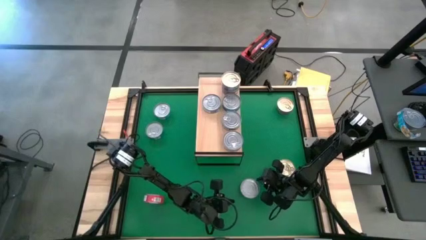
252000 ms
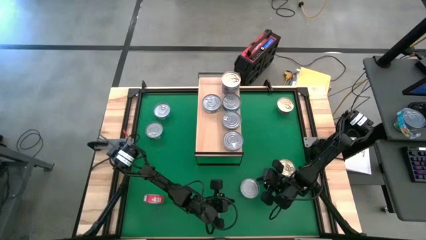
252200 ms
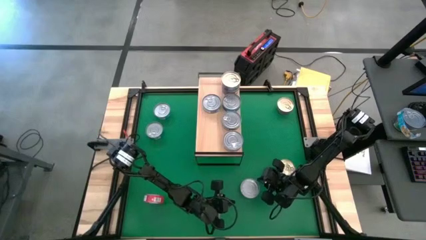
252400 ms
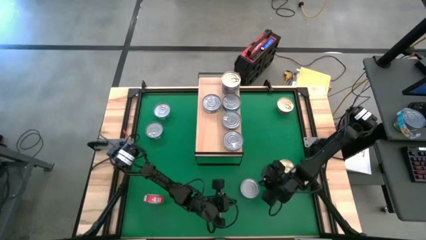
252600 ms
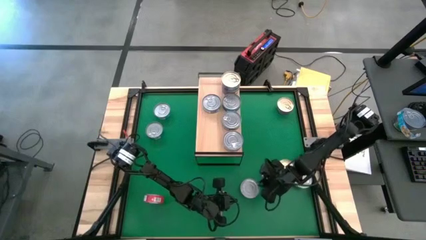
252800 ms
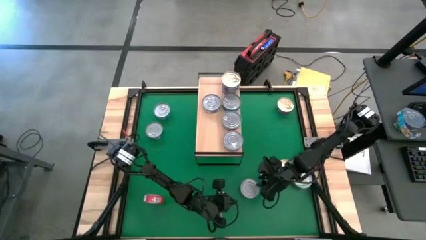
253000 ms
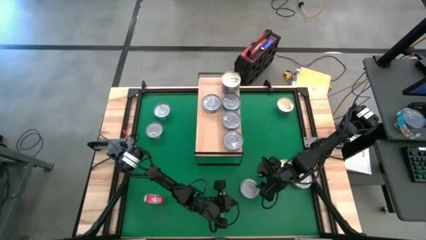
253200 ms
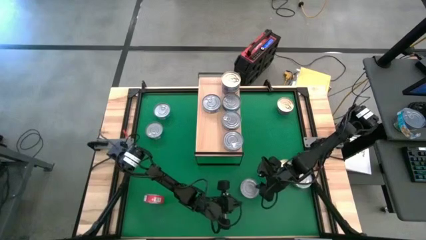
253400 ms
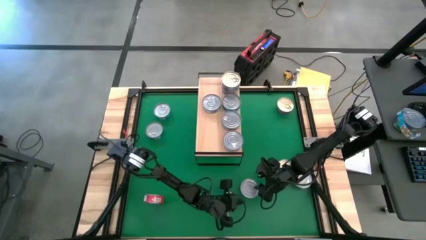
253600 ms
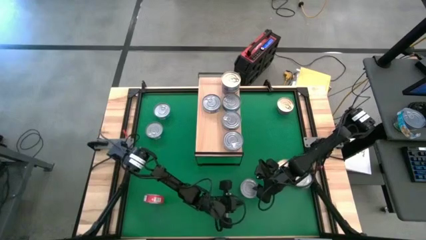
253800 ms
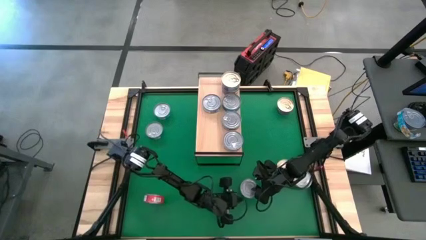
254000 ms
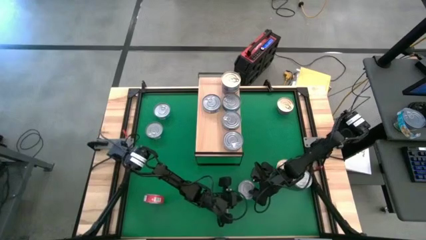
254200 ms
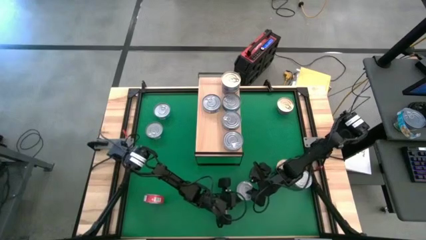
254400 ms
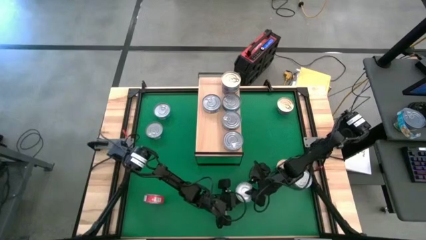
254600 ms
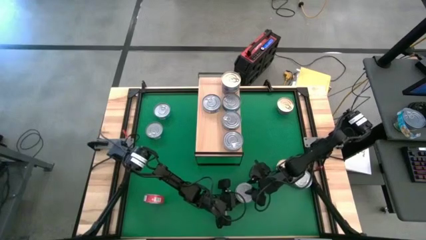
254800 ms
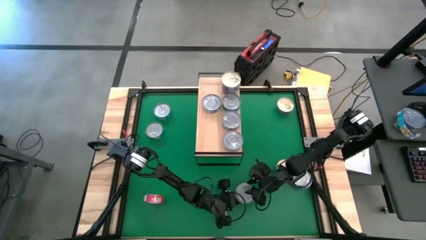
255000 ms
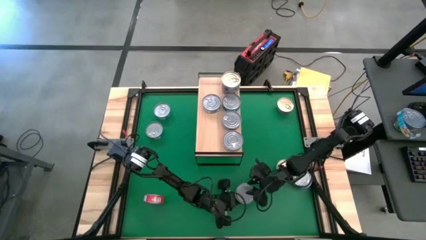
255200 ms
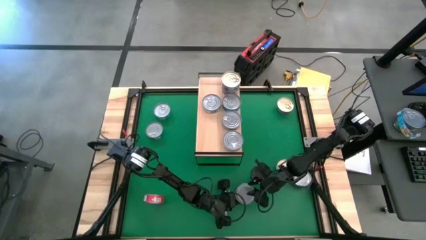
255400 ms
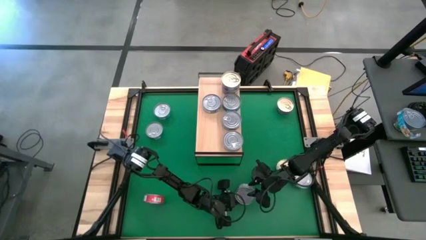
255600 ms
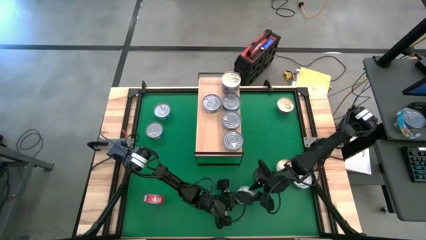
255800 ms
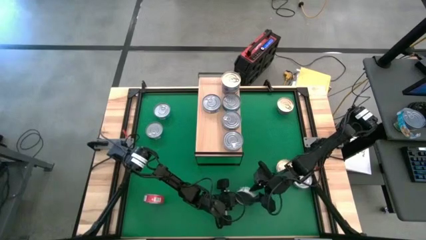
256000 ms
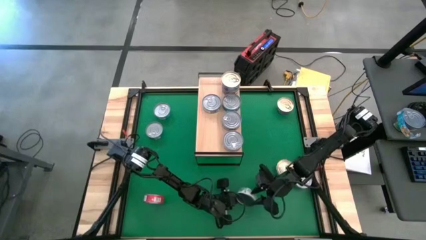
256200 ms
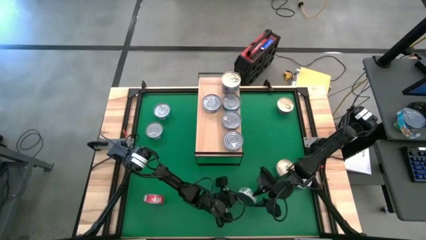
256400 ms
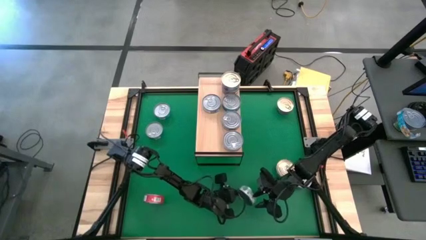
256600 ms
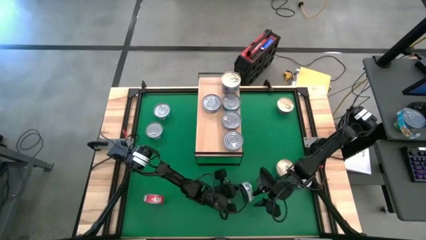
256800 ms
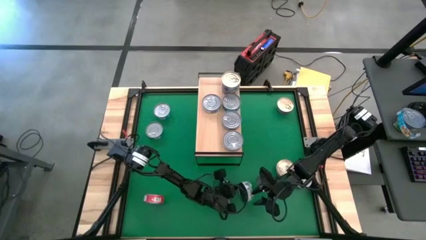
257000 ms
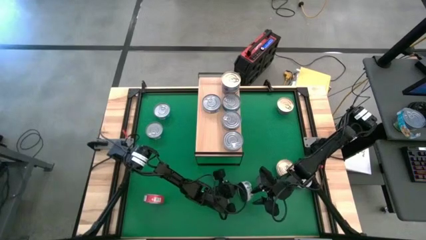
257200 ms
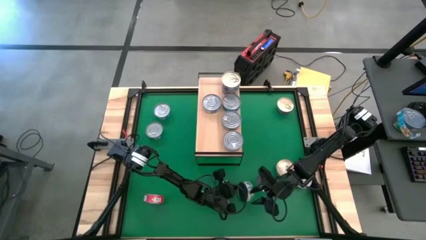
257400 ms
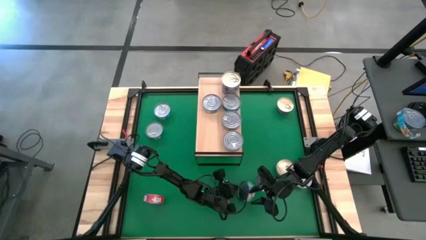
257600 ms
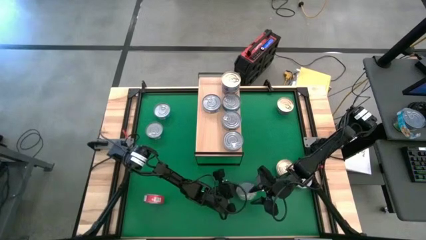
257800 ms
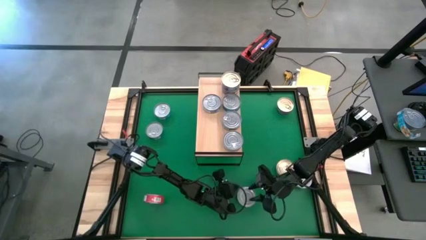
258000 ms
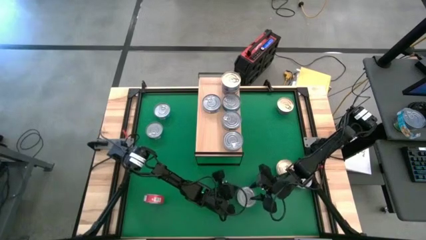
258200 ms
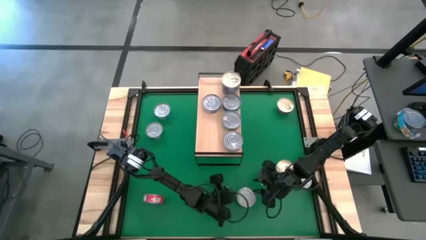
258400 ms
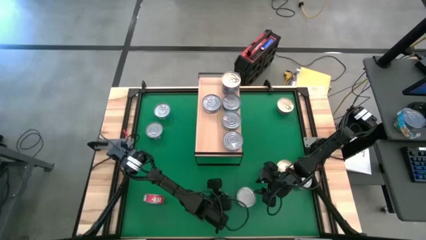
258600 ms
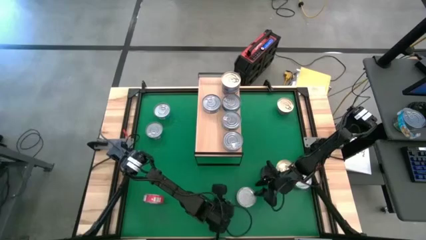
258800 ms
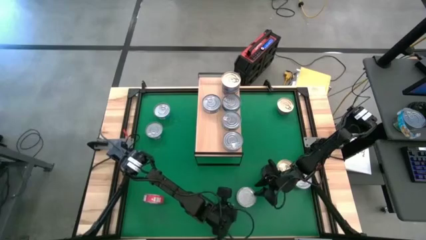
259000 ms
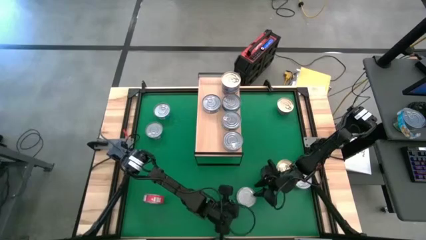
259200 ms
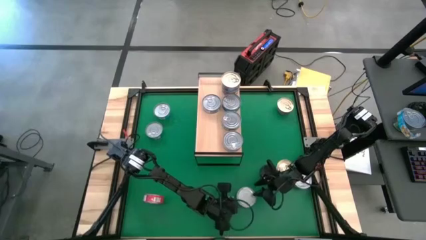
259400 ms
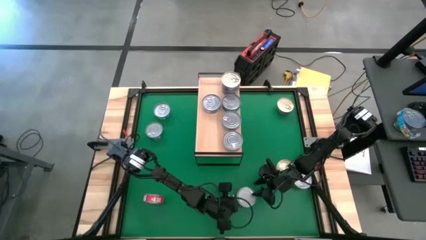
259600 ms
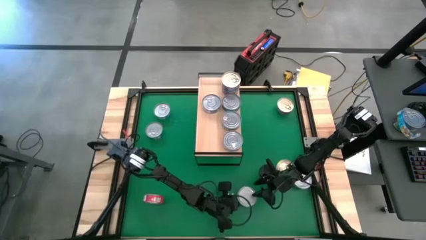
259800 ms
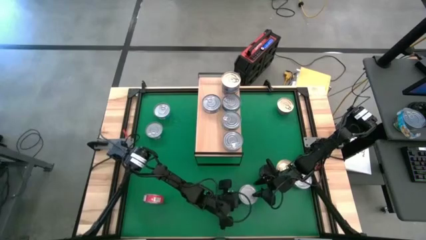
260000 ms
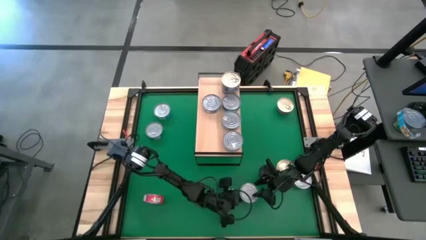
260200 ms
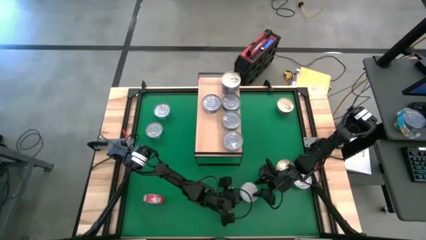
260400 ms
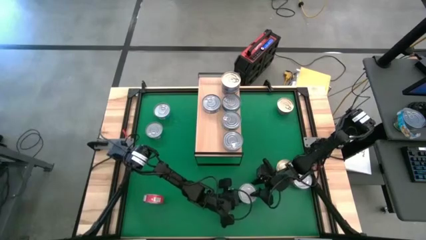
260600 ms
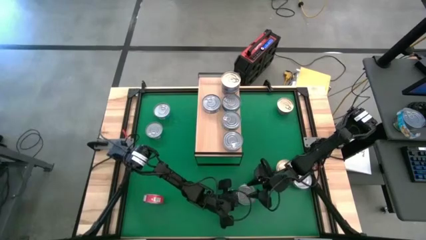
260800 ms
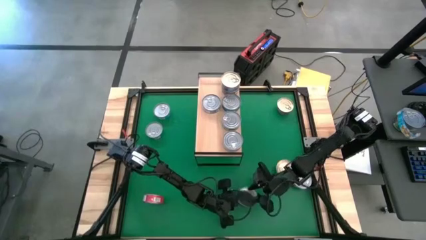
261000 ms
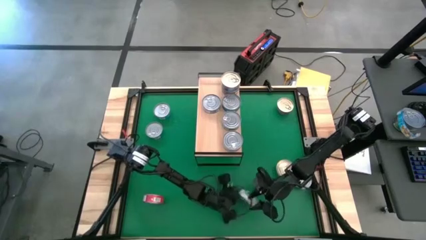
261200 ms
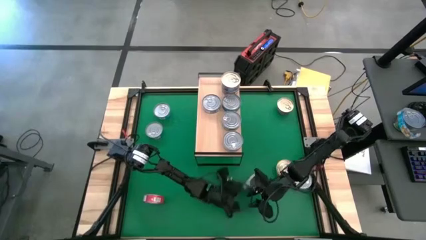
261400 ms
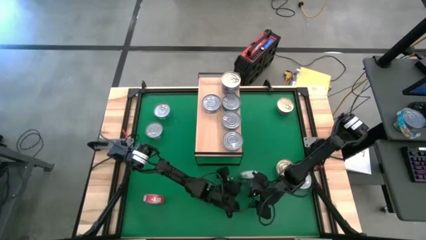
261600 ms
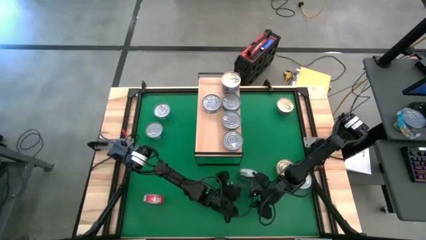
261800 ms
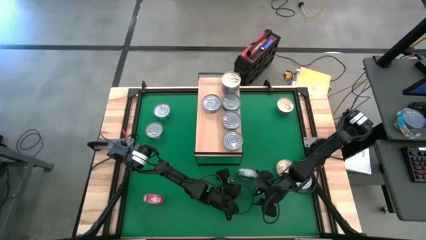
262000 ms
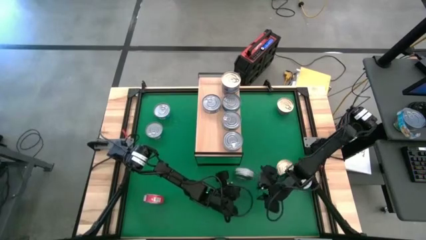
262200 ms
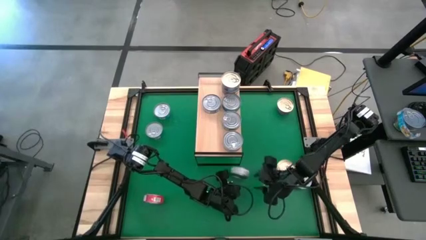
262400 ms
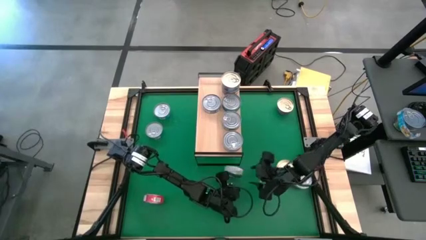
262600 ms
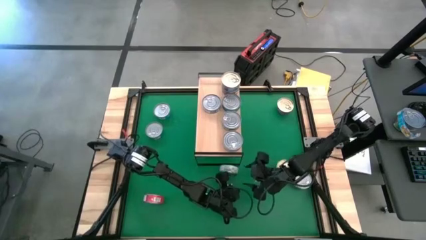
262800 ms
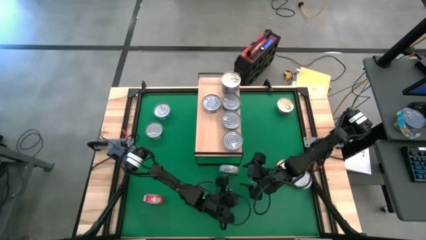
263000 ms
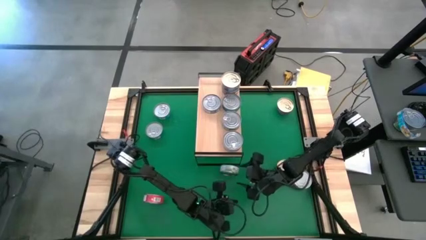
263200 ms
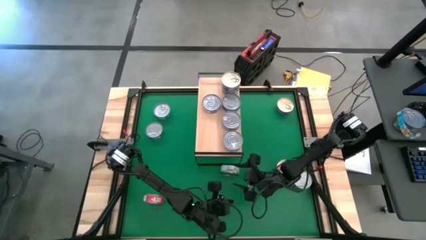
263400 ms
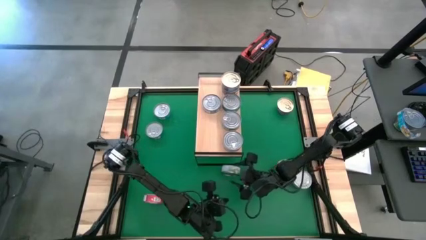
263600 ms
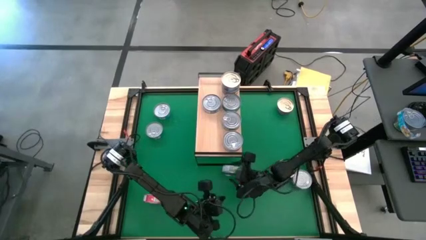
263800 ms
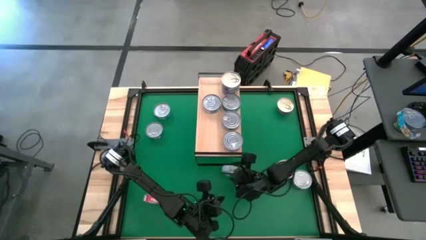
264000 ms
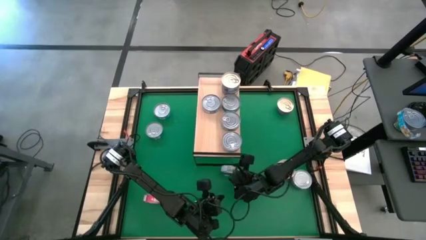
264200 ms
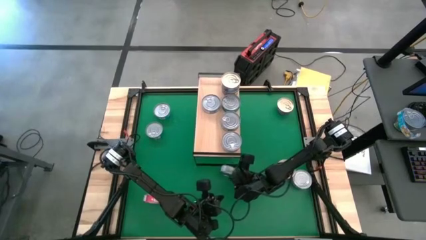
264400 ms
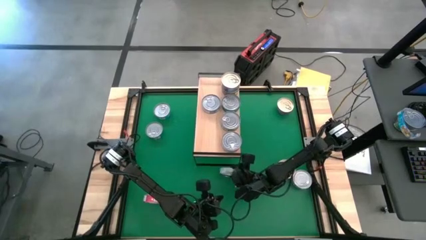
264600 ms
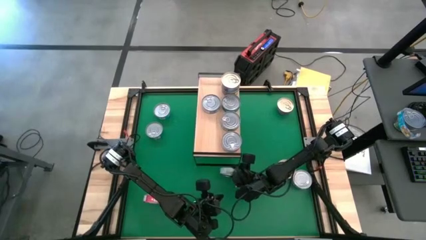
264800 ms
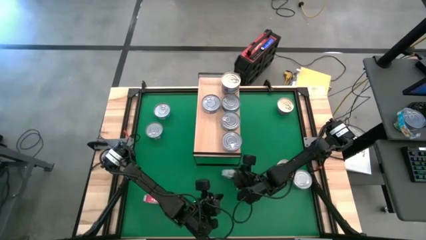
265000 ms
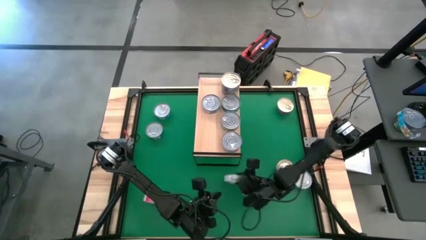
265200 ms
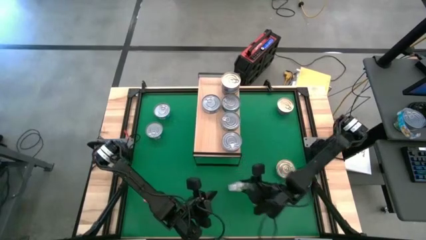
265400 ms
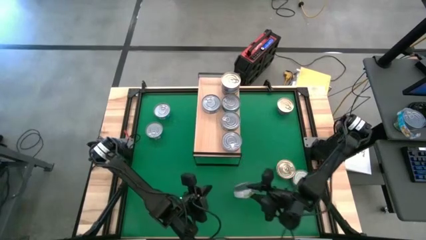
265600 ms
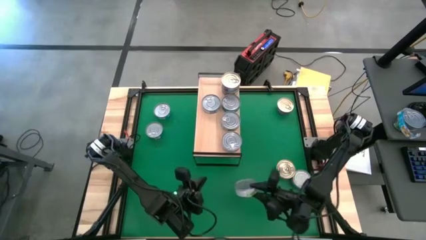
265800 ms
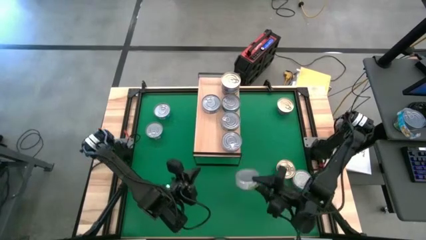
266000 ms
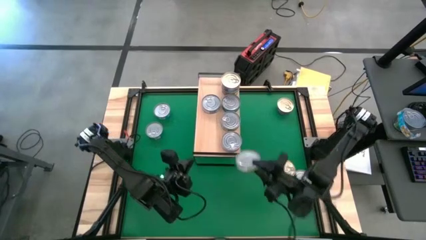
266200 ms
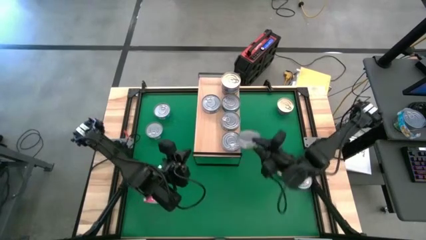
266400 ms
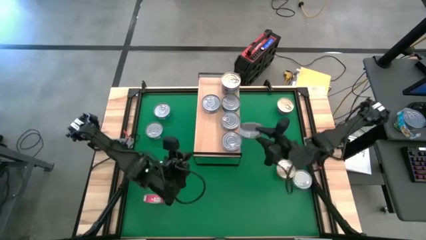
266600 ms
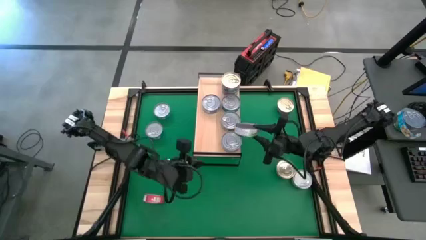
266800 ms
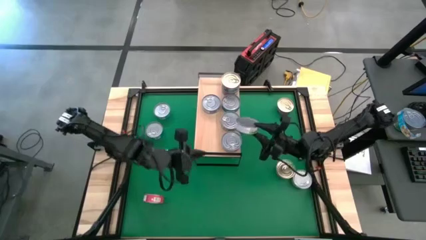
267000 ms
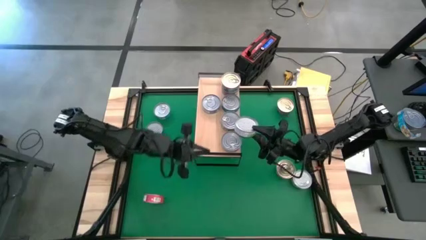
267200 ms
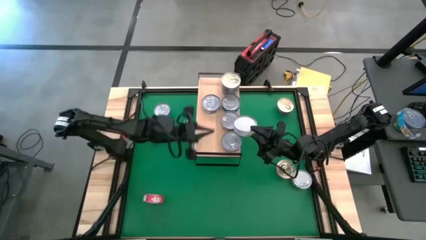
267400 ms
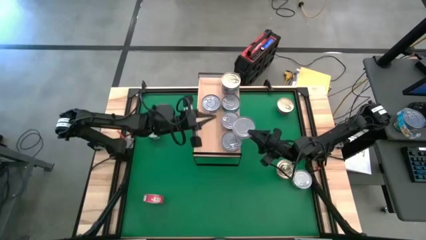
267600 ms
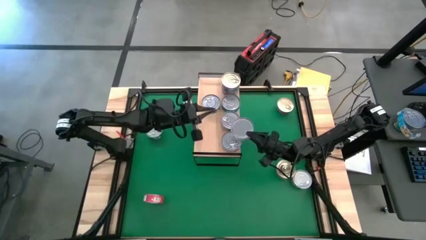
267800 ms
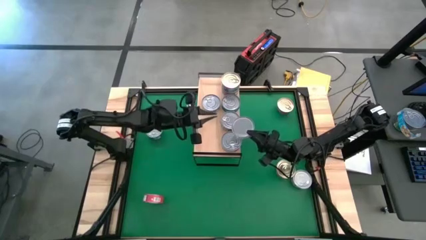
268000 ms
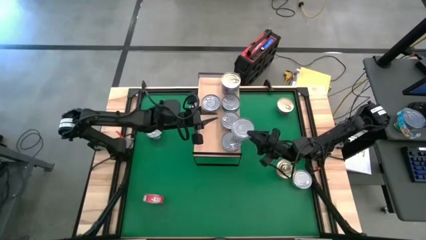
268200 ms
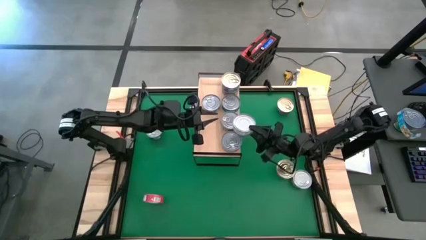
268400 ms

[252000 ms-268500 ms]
Task: Stack canned seafood by type on shelf
Stack the top green tuna can on top of the green tuna can on the shelf
